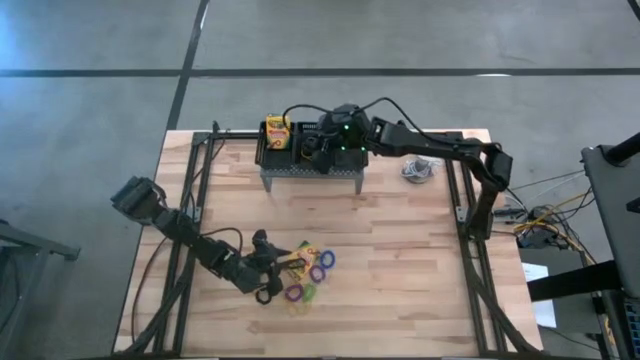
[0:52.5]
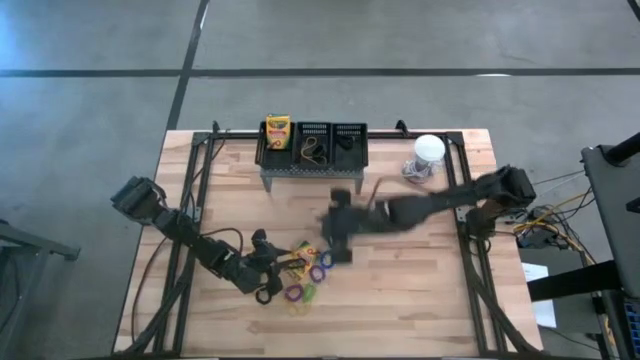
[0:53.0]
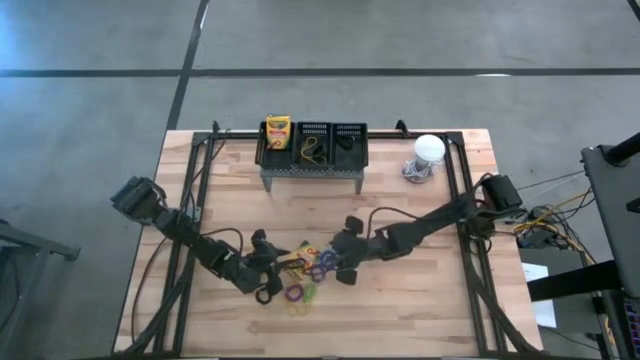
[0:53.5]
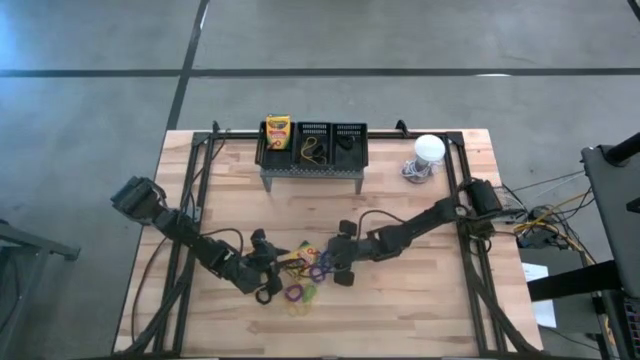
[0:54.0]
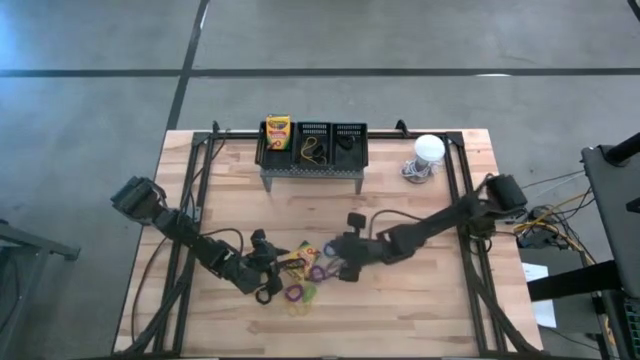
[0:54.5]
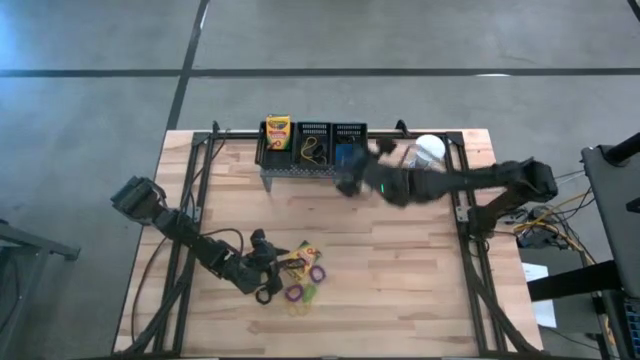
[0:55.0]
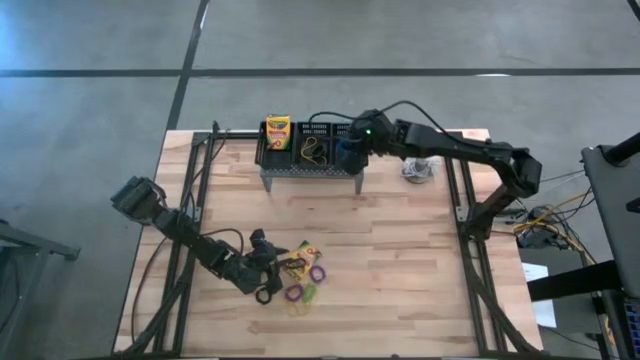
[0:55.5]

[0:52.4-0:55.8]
Task: Pick & Place Office Desk Supplies
Put the blue spring keychain into the right black bin on the shelf

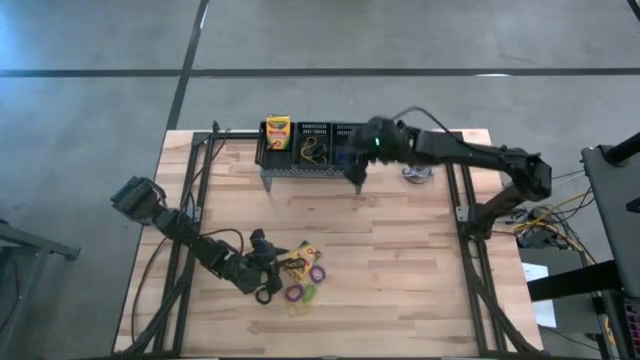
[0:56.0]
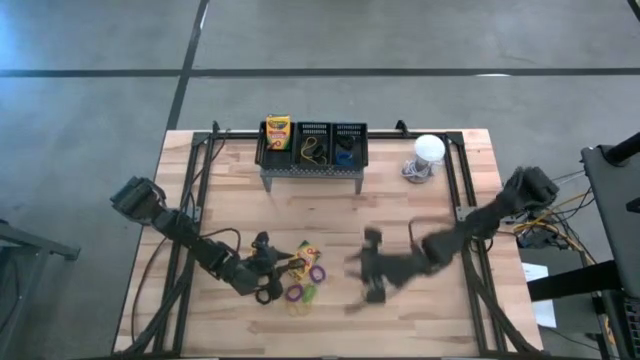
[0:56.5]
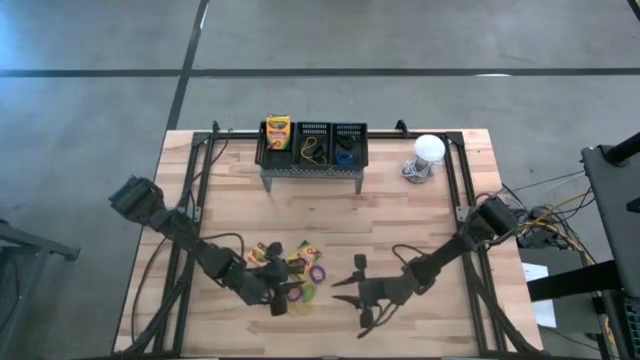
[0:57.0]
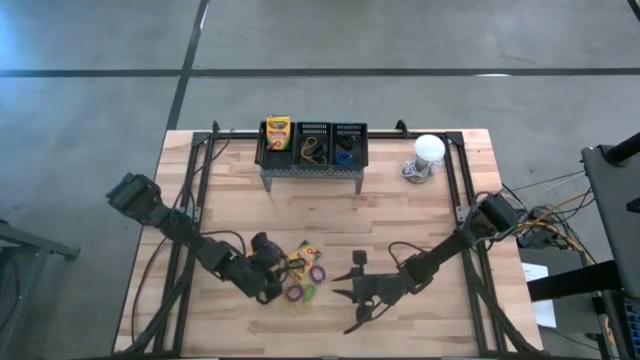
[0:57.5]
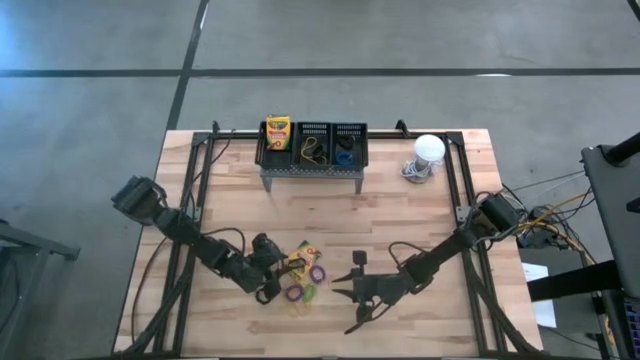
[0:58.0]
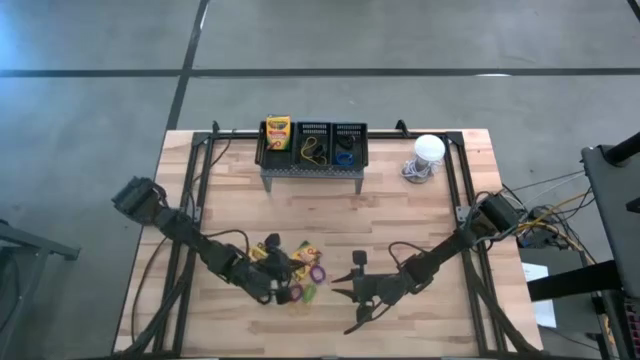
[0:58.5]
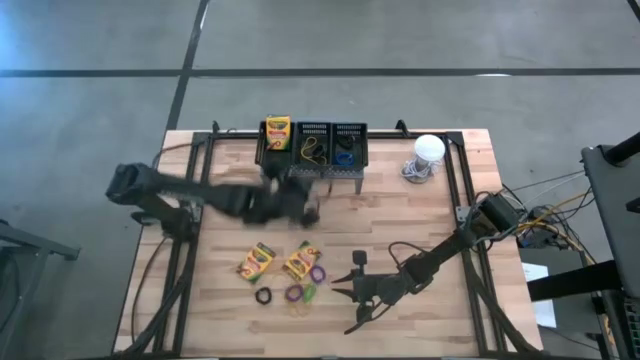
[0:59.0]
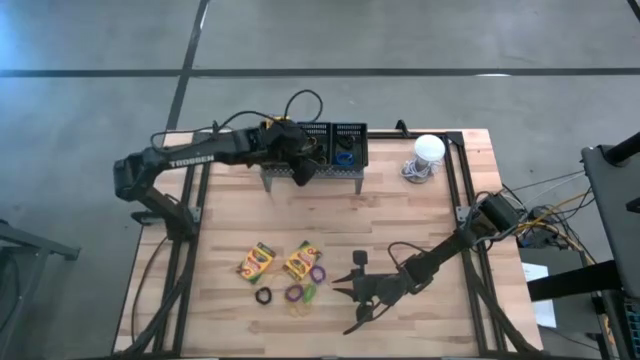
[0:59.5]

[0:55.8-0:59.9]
Put the black rubber band into the middle black bin on the shelf

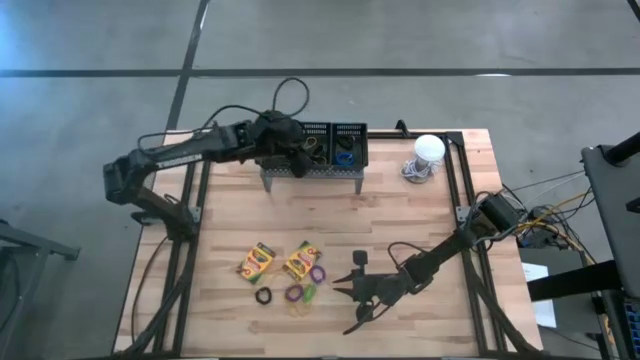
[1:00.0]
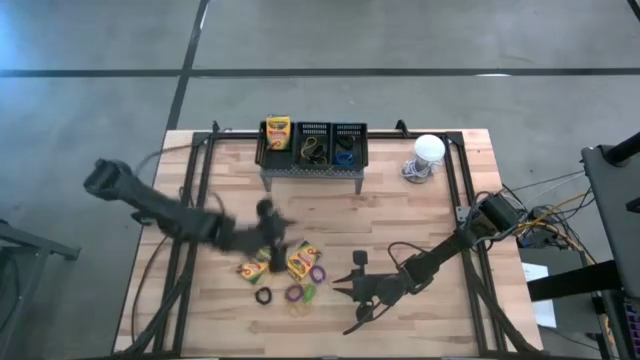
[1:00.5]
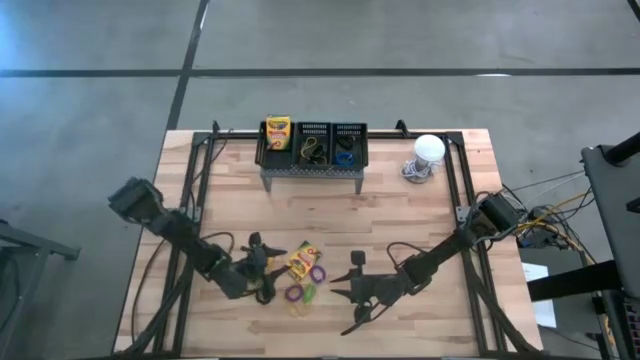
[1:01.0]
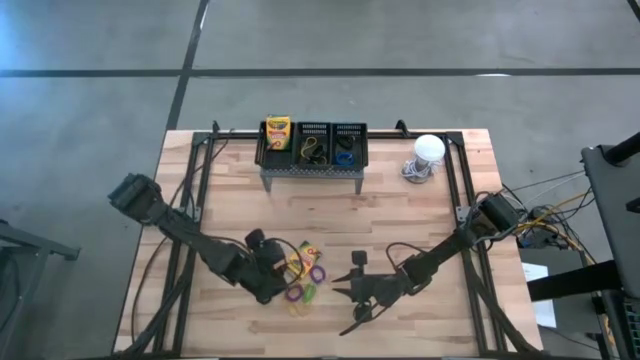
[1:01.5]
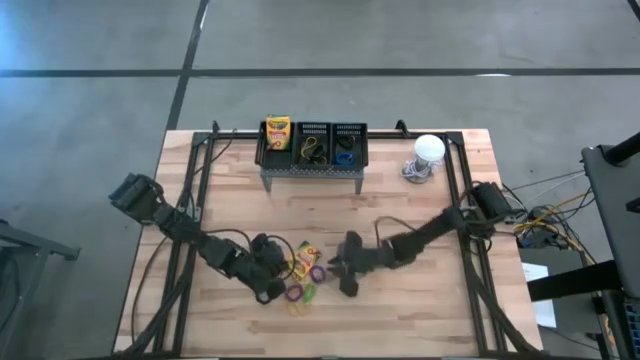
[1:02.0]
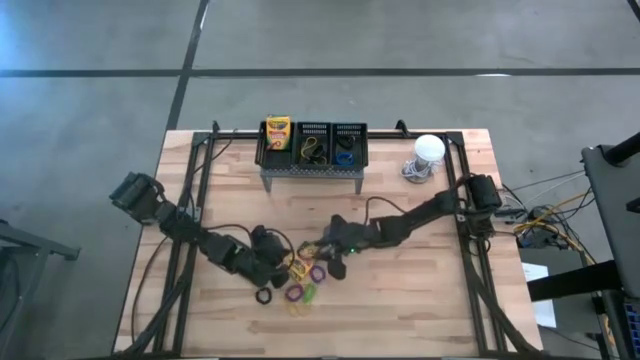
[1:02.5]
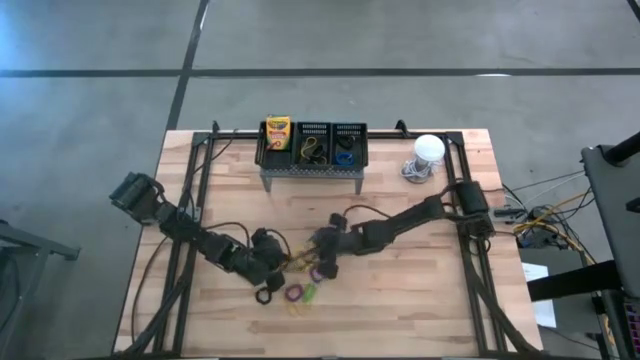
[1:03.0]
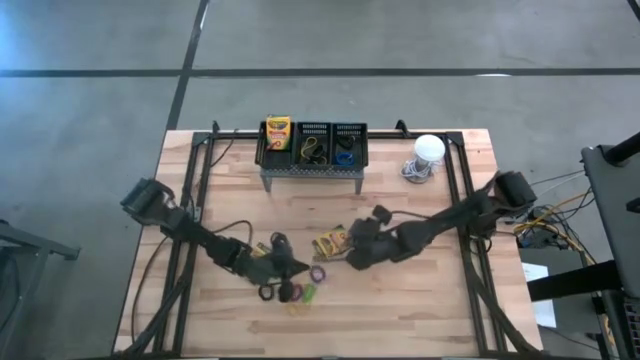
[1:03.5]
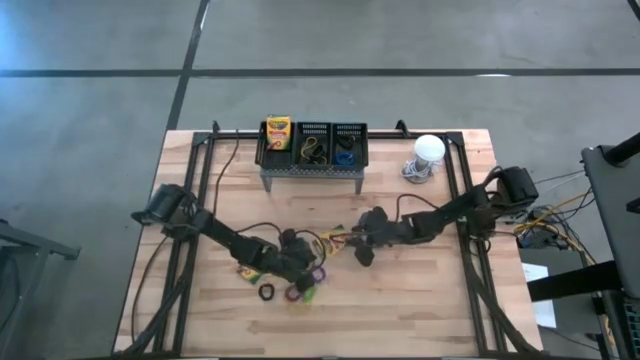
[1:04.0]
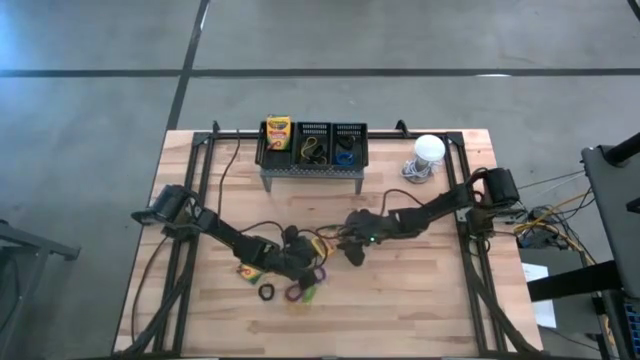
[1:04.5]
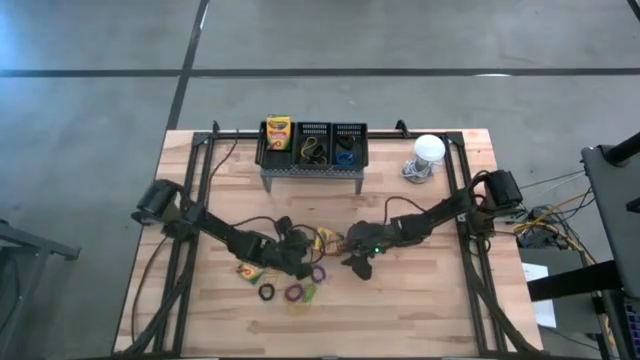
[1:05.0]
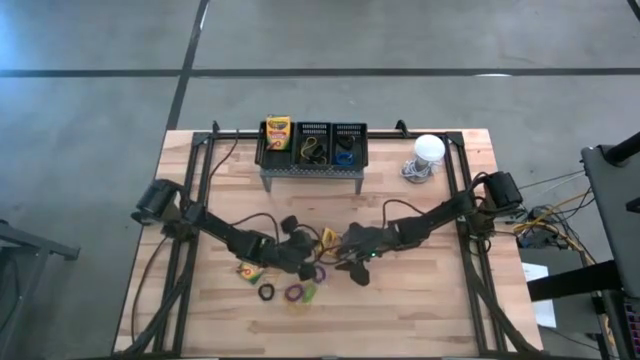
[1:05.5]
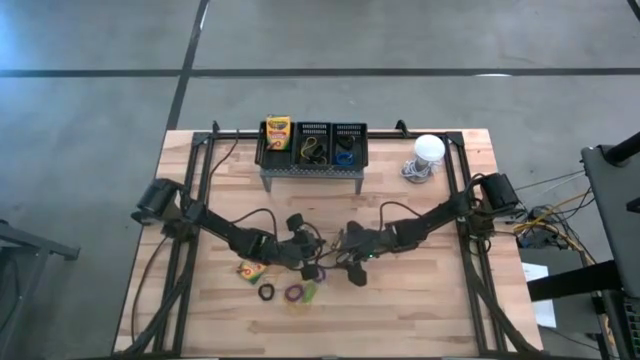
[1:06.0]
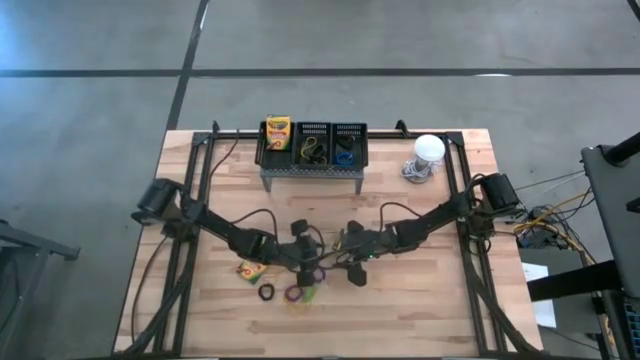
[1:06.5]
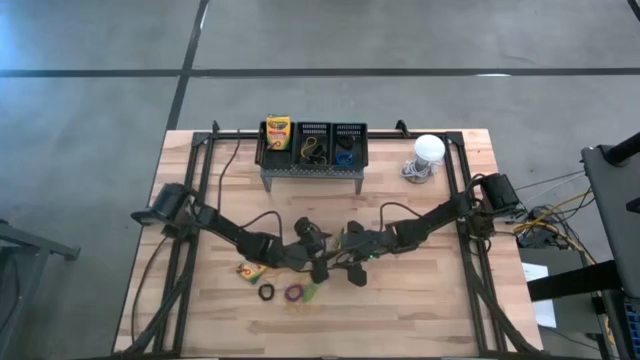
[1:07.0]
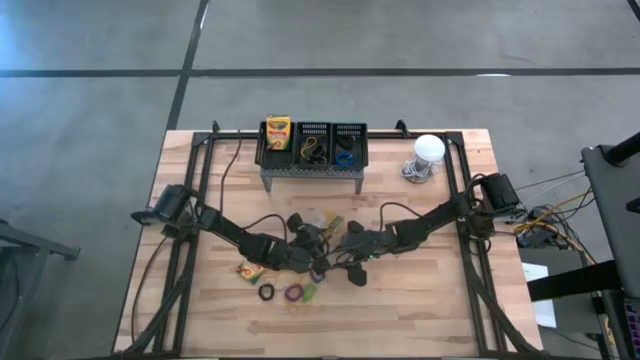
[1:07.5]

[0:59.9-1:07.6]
Put the yellow crayon box into the left black bin on the shelf

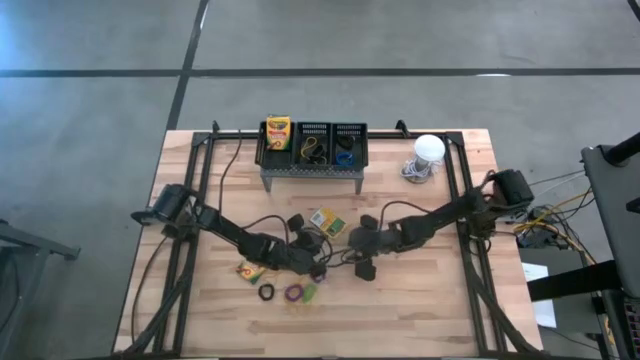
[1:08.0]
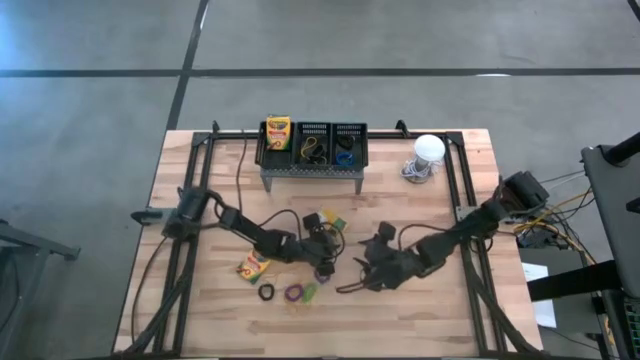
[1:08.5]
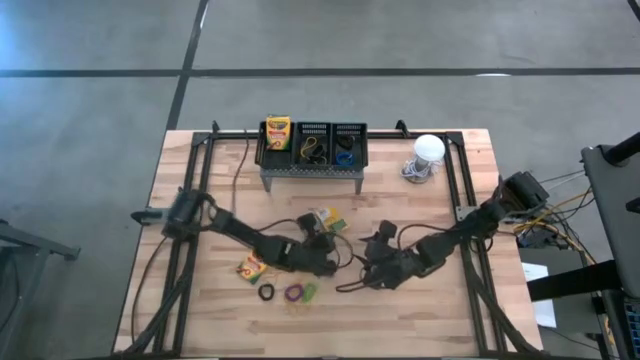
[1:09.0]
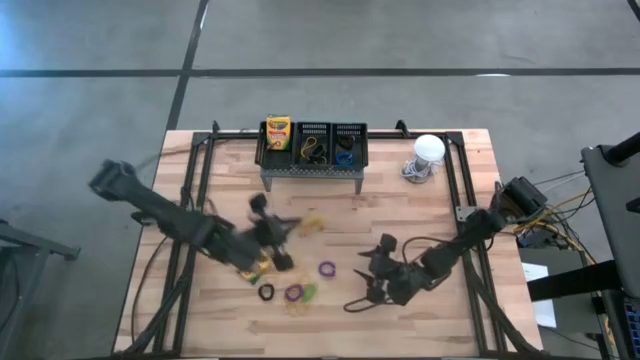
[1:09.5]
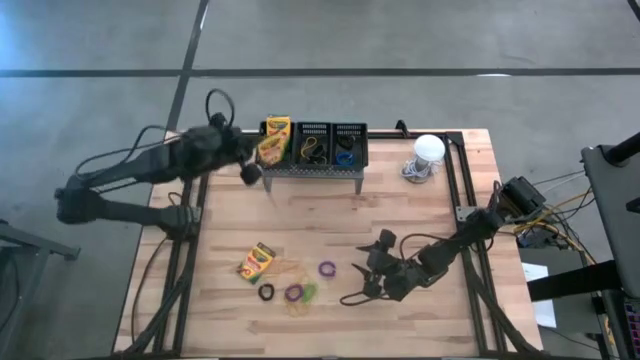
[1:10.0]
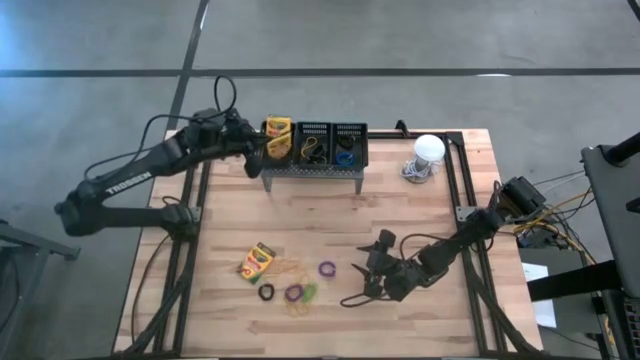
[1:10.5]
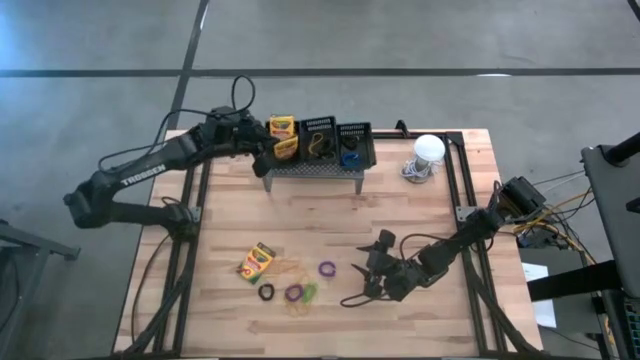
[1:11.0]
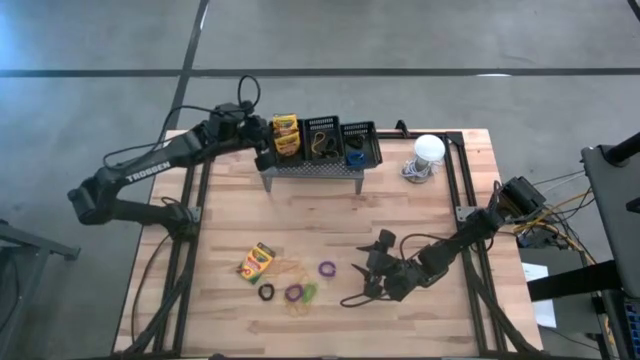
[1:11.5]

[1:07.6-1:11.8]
Put the yellow crayon box into the left black bin on the shelf

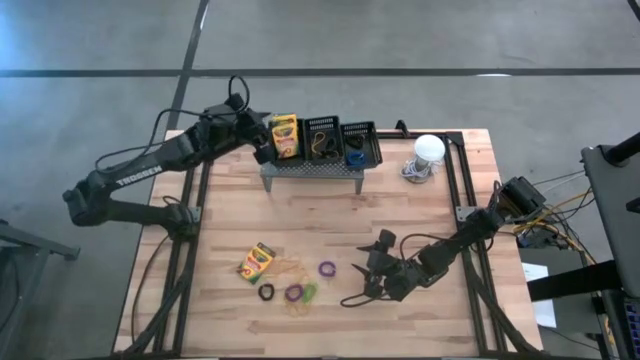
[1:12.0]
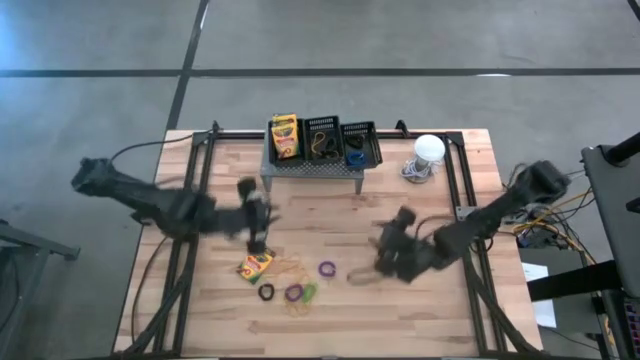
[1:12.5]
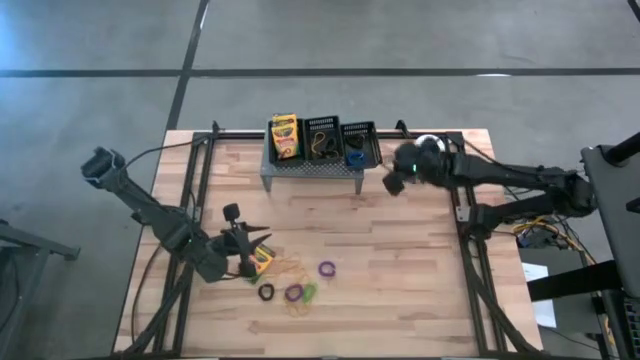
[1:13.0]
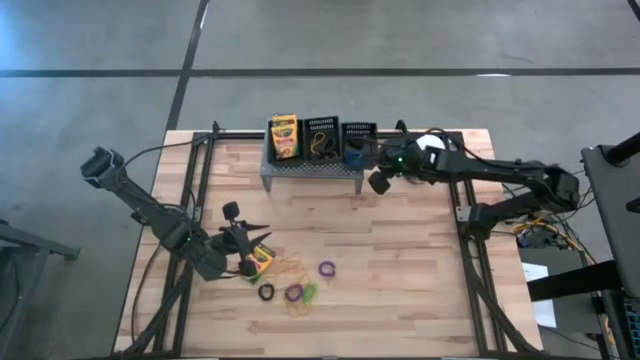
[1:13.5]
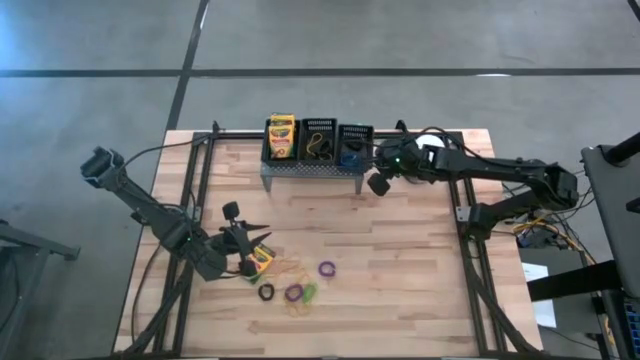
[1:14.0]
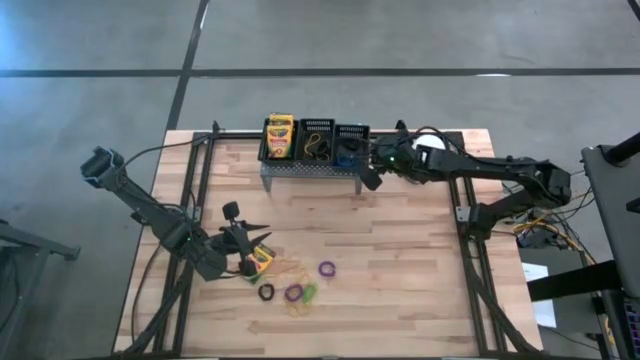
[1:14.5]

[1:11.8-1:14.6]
Adjust the right black bin on the shelf

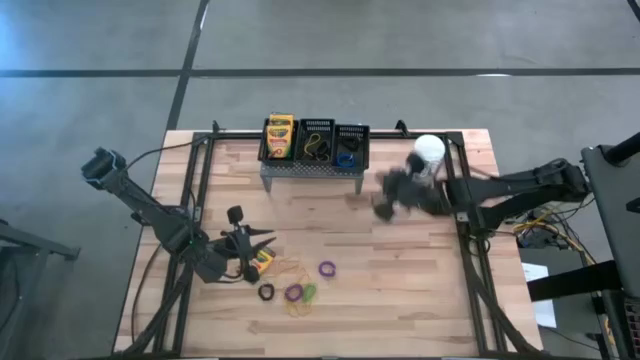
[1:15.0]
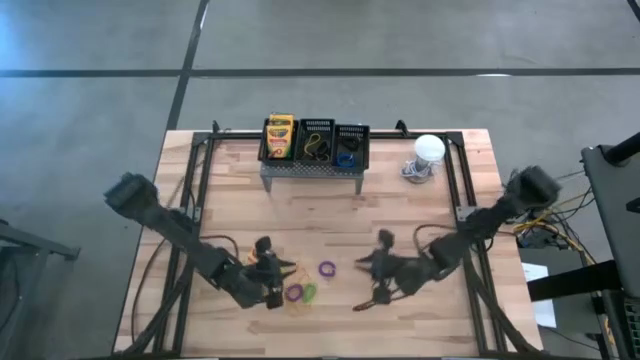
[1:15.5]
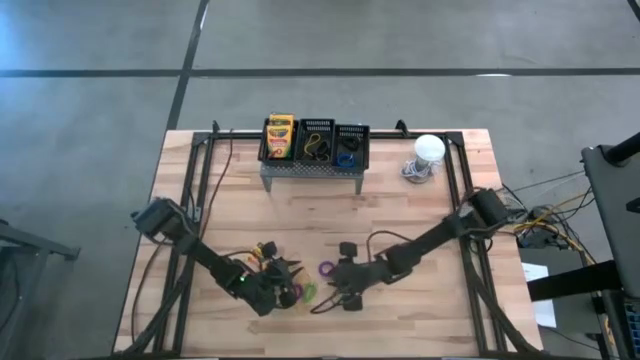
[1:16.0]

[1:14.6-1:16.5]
Put the purple spring keychain into the right black bin on the shelf
